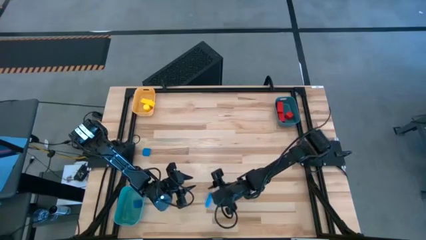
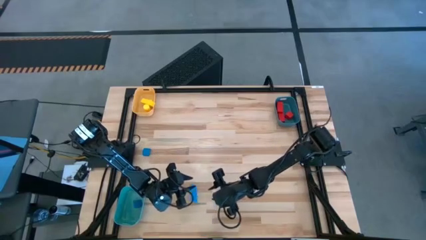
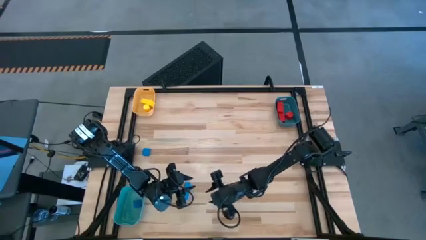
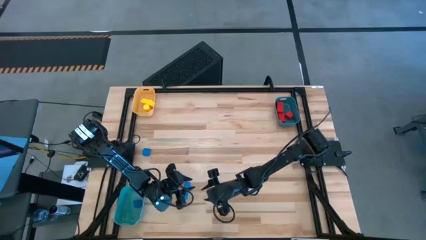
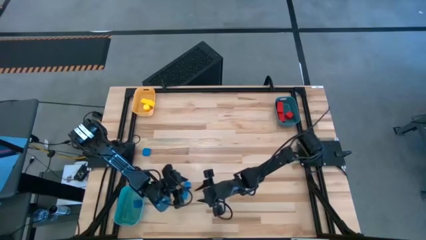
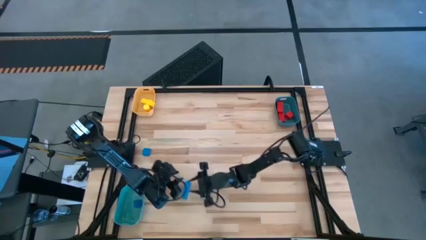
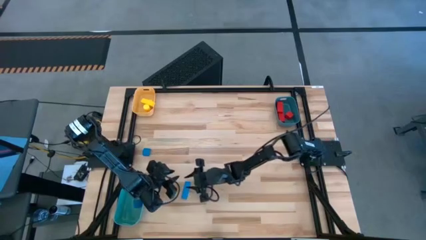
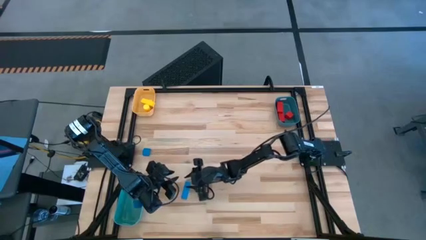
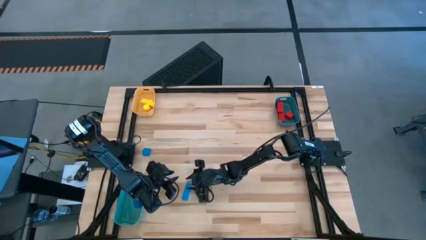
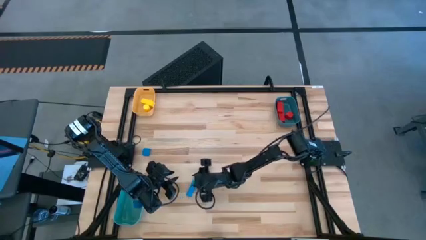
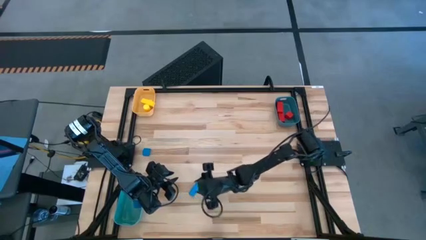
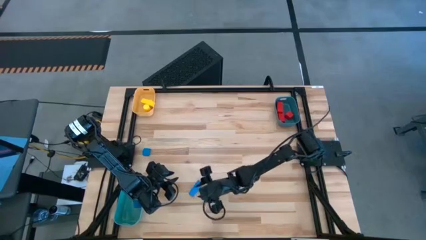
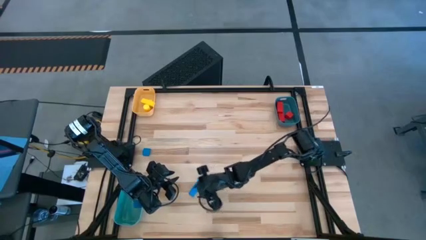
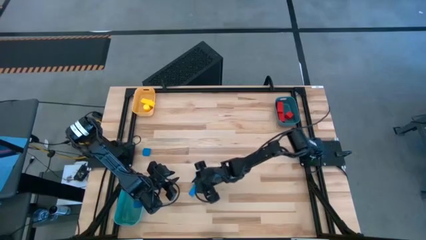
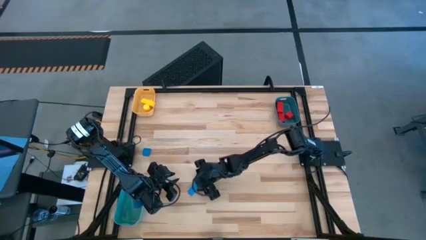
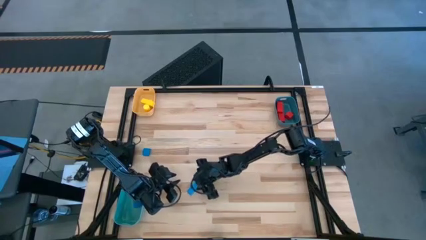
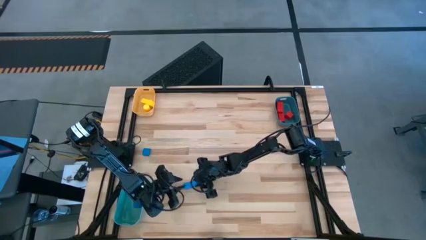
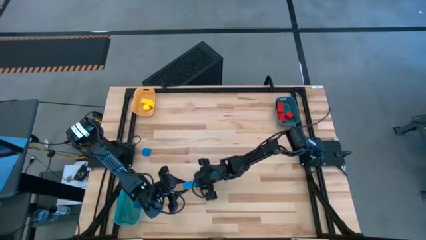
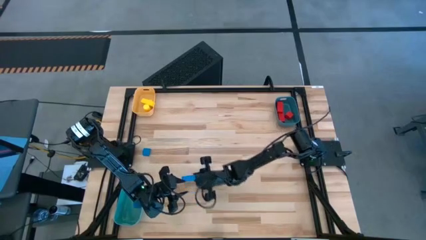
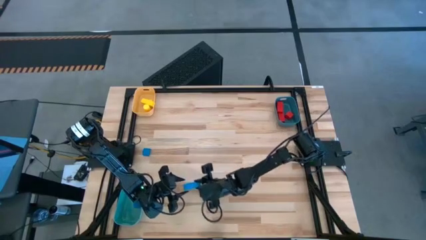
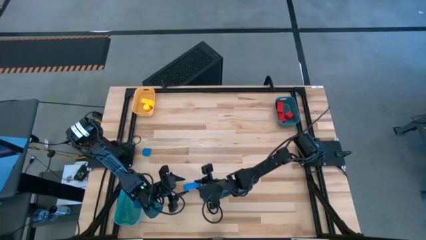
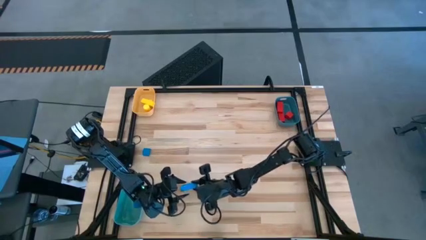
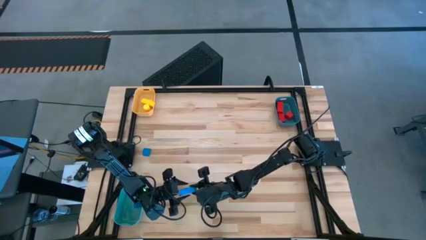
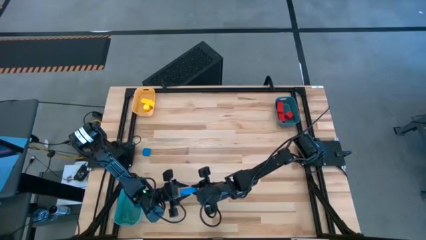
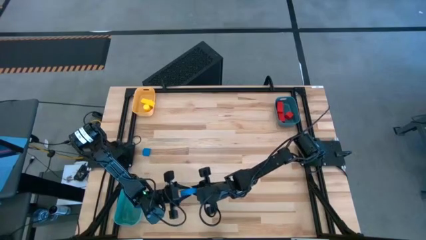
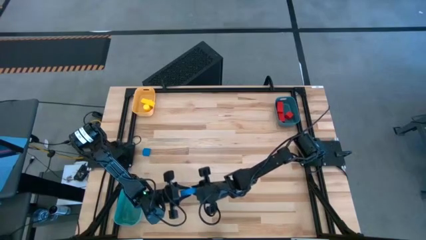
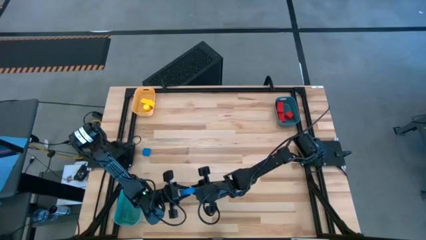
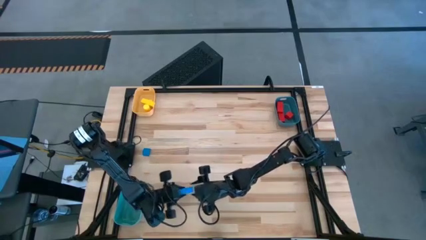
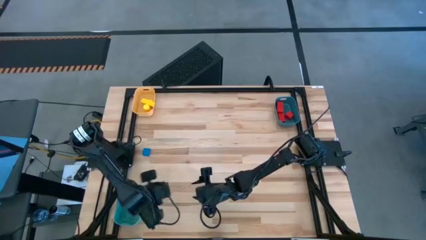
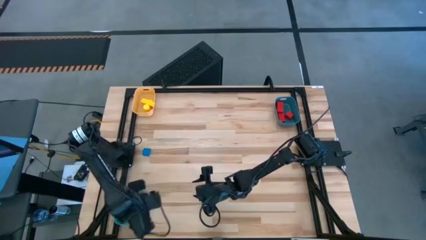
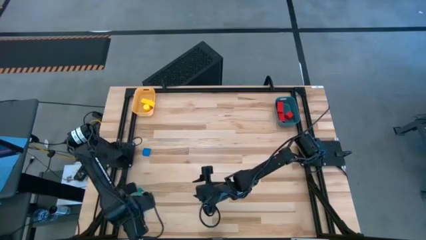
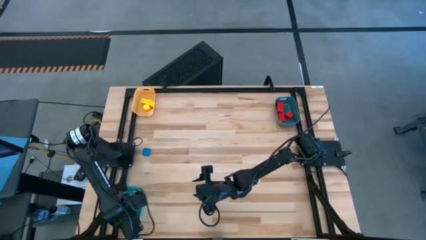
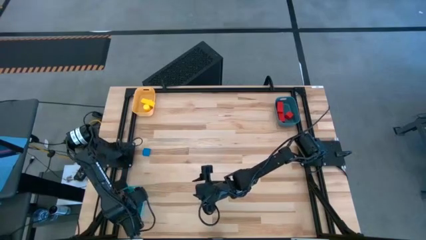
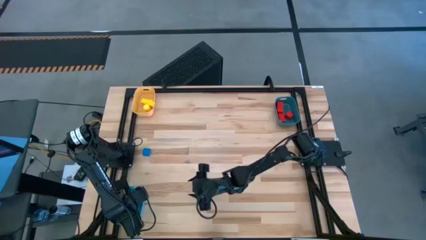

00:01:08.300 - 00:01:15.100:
Task: Sort & place blocks by color
Put the bottom blue block into the green bin

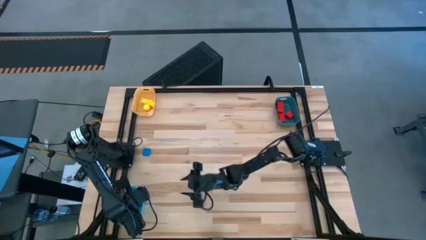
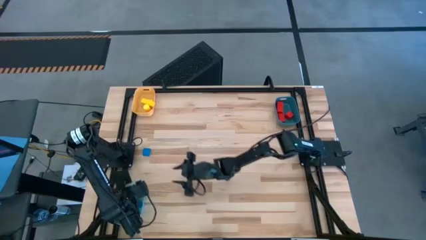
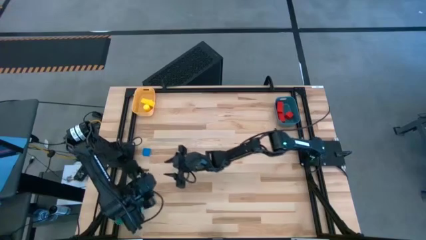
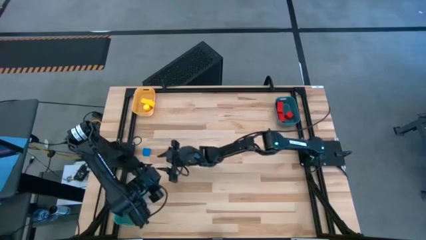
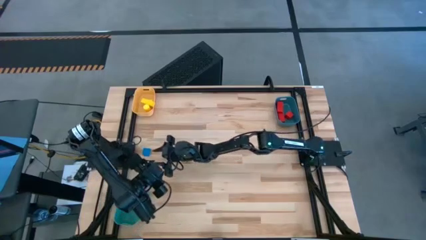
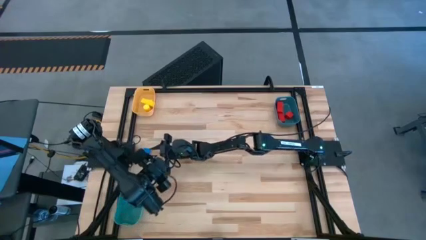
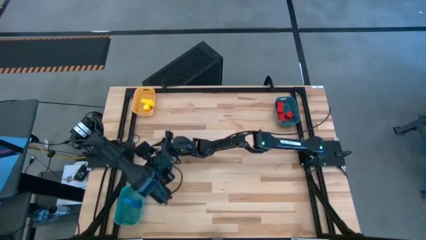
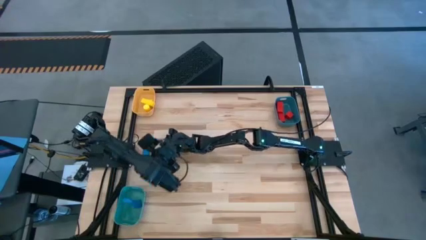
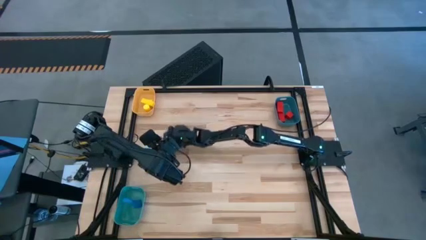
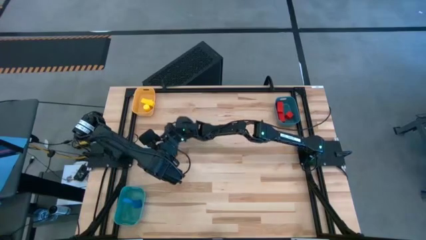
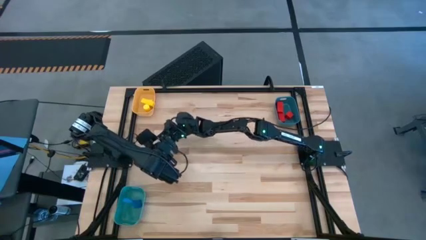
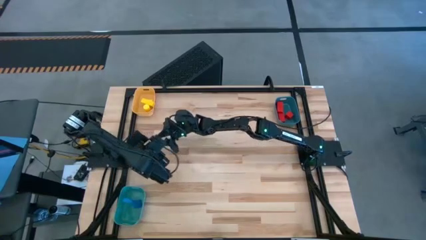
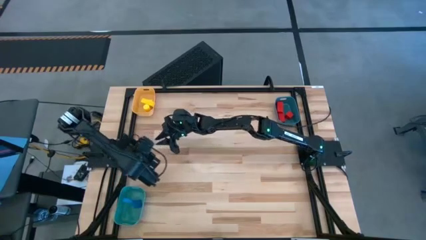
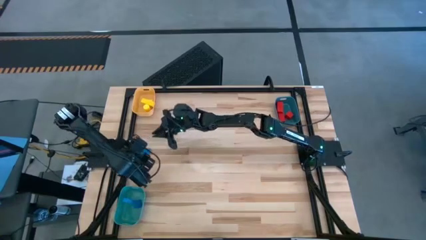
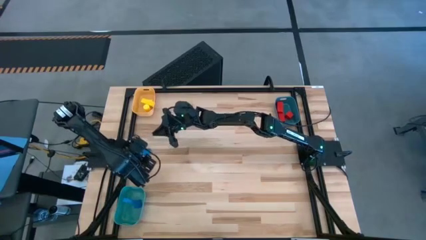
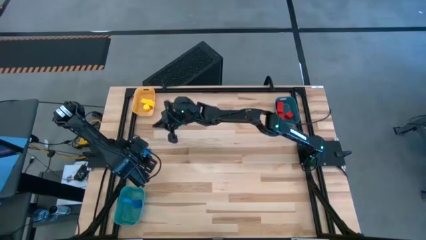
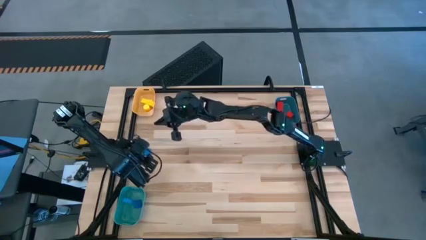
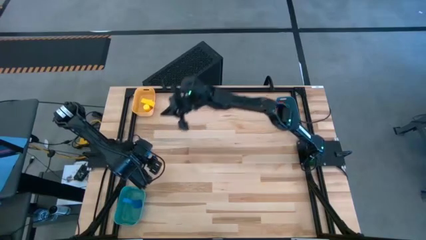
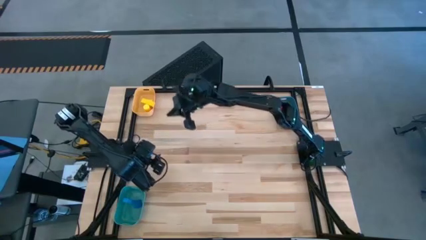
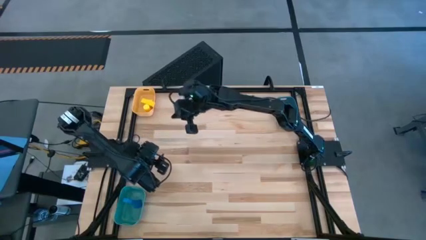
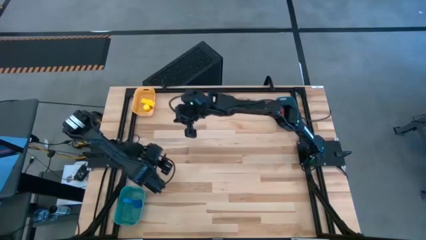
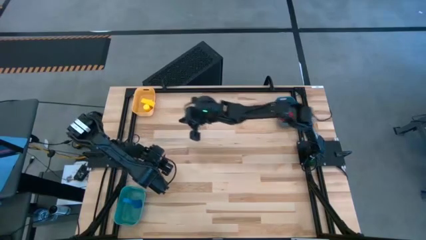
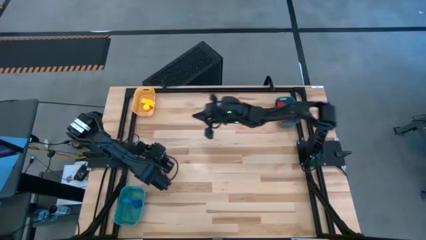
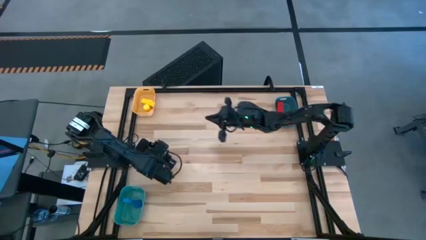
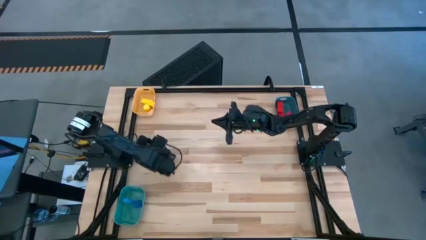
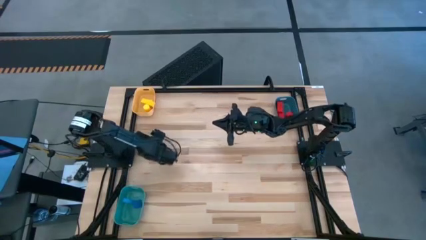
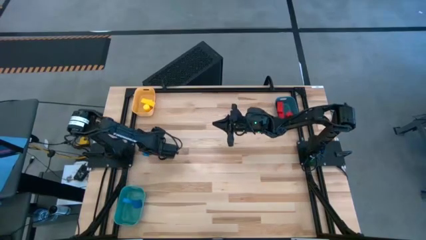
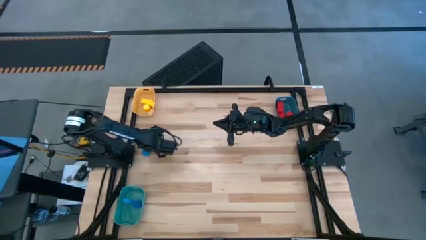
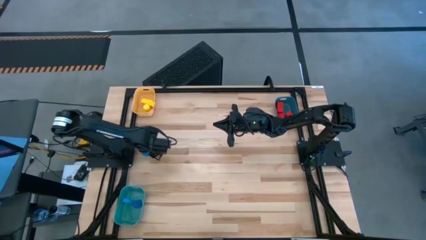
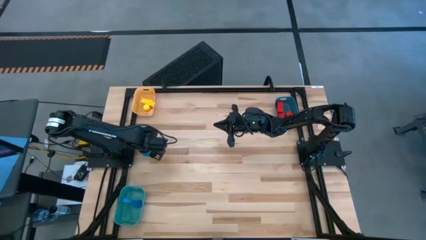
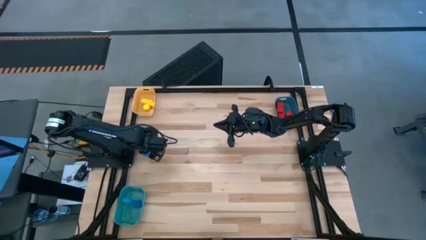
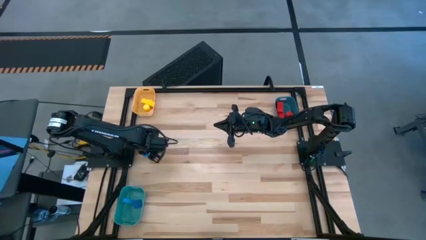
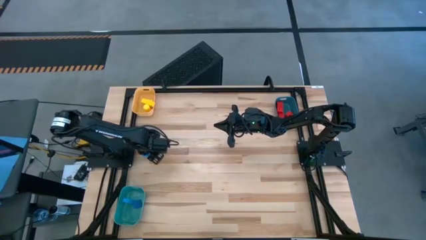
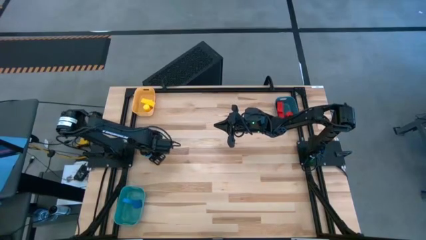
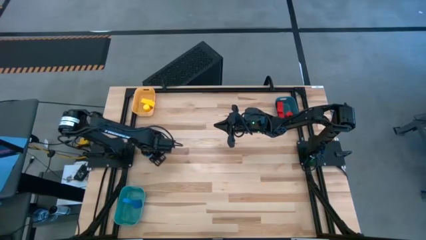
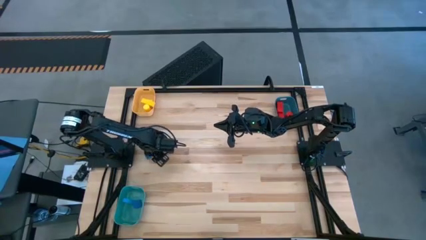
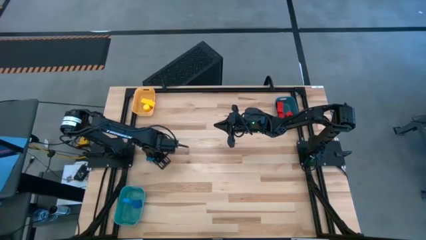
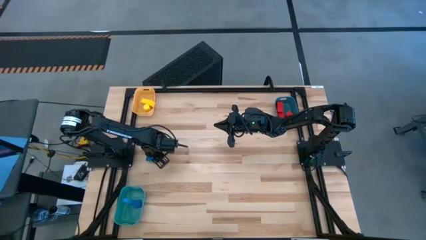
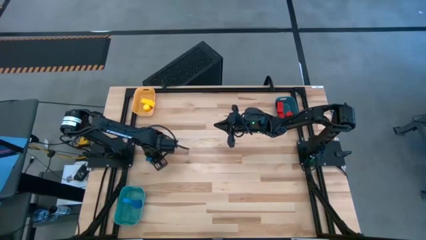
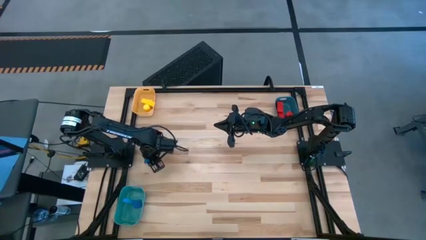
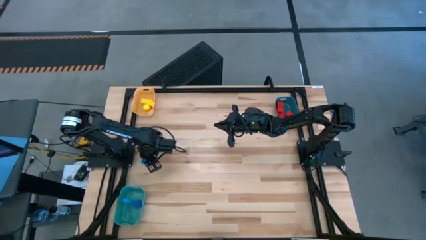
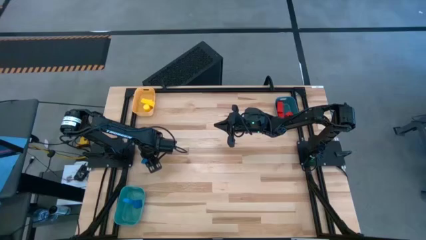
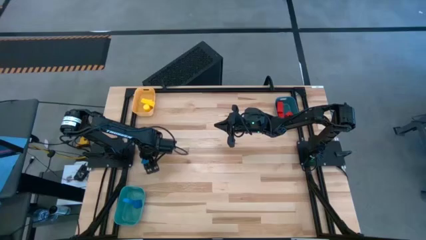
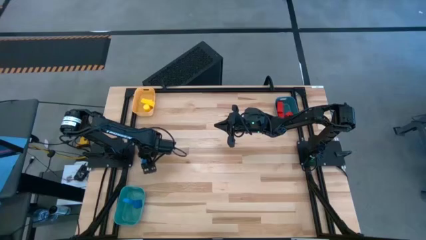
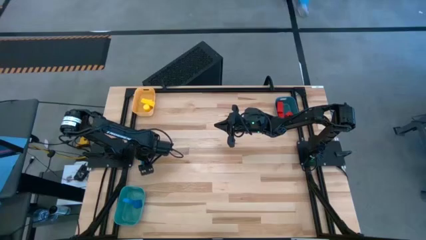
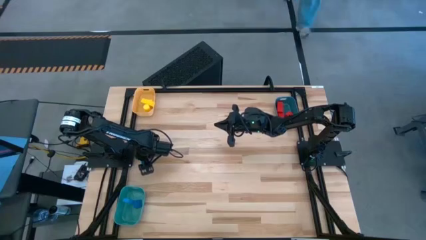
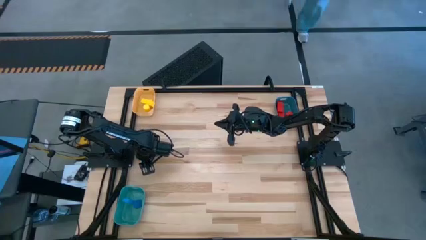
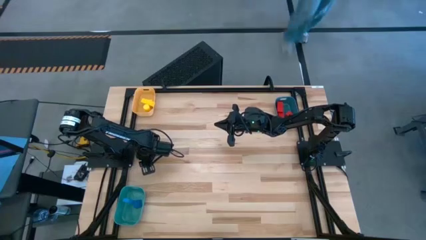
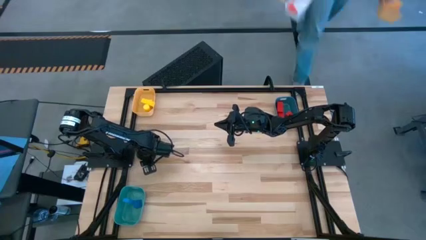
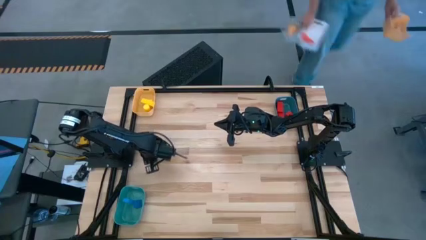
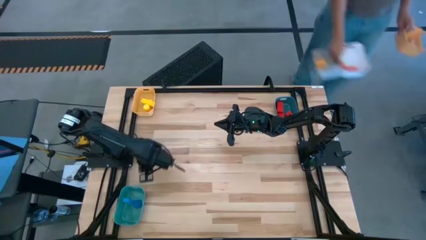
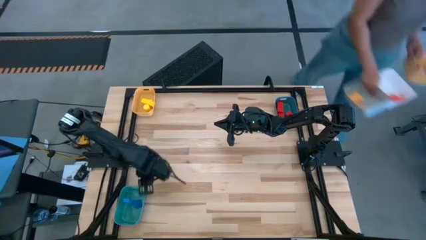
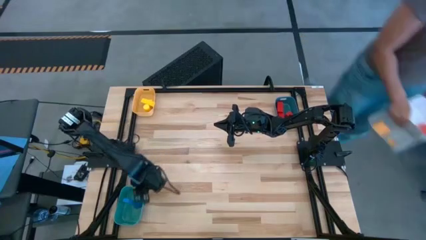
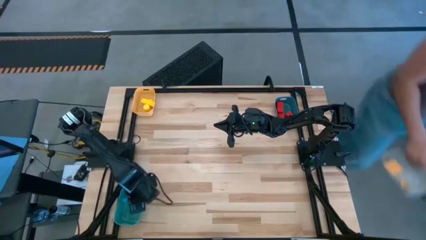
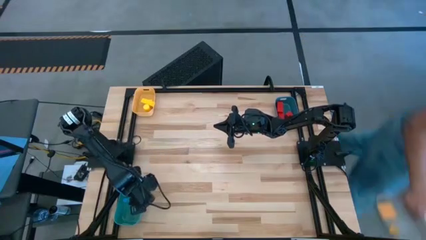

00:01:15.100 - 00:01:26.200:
Put the blue block into the green bin
